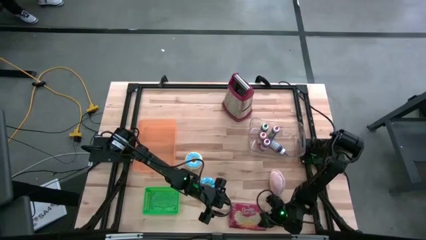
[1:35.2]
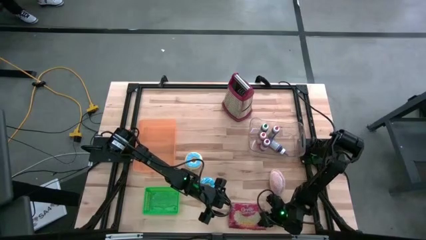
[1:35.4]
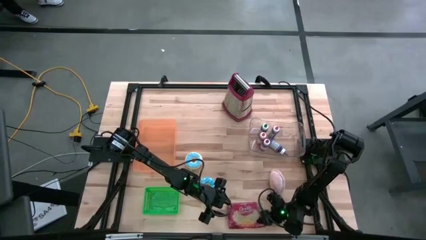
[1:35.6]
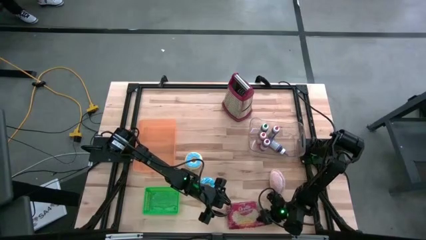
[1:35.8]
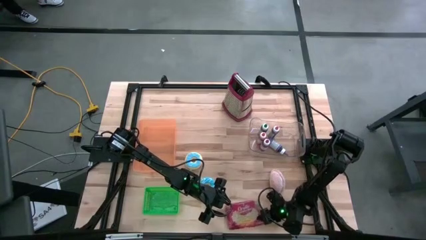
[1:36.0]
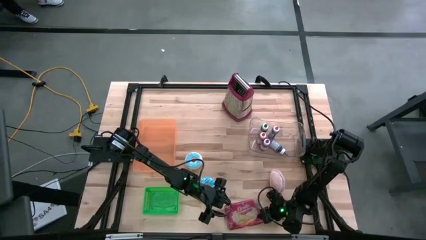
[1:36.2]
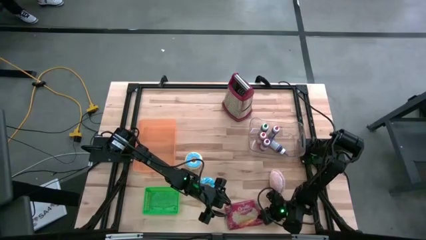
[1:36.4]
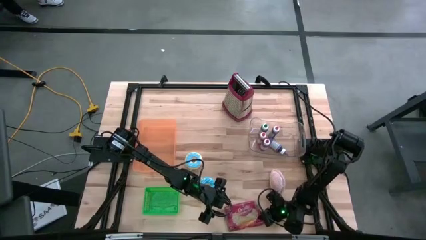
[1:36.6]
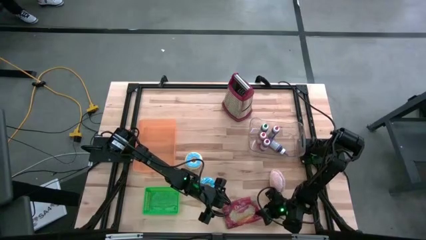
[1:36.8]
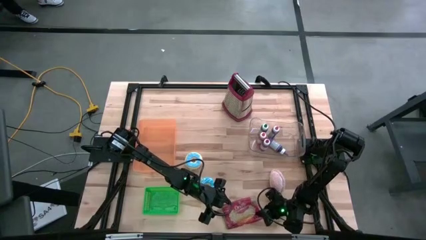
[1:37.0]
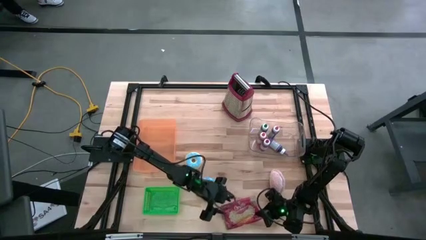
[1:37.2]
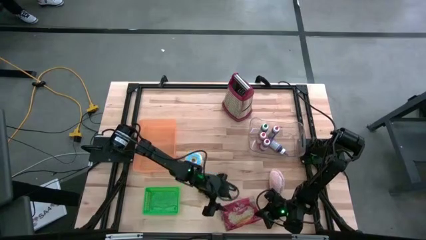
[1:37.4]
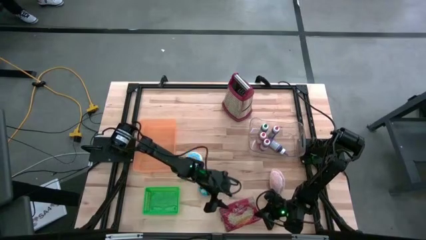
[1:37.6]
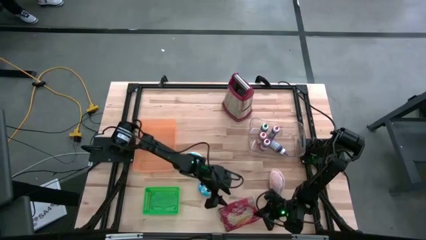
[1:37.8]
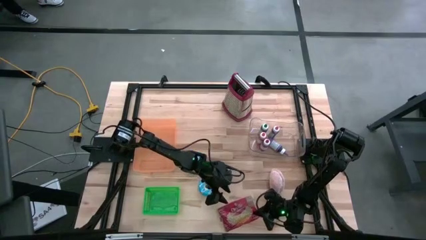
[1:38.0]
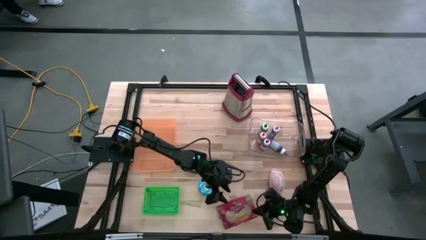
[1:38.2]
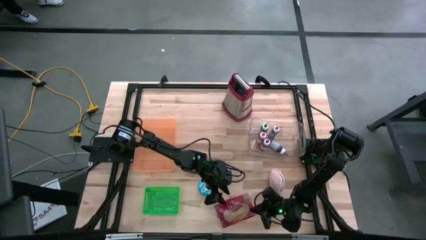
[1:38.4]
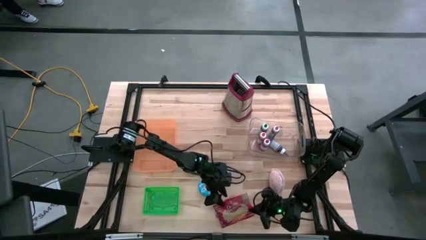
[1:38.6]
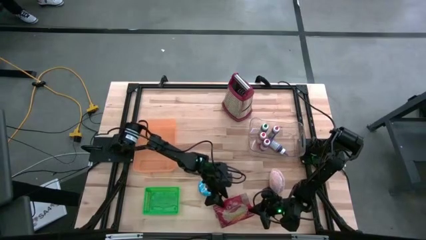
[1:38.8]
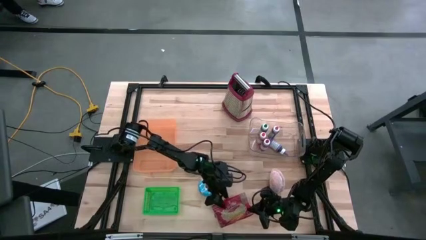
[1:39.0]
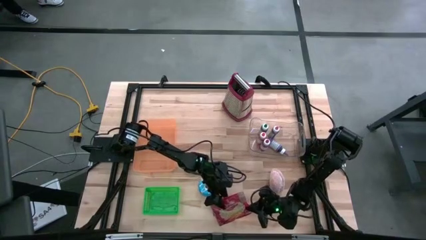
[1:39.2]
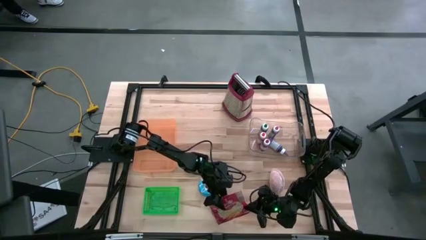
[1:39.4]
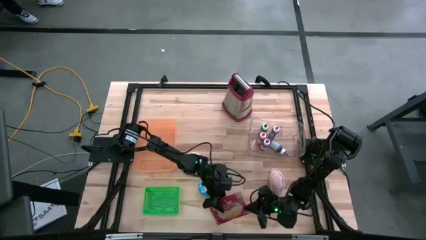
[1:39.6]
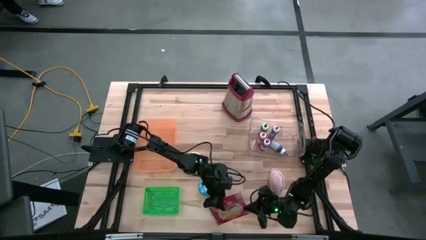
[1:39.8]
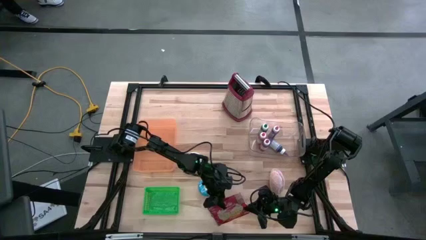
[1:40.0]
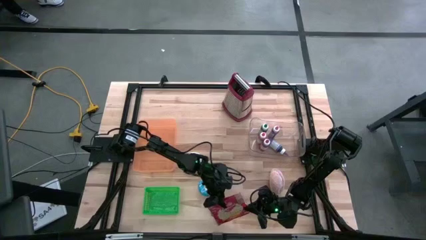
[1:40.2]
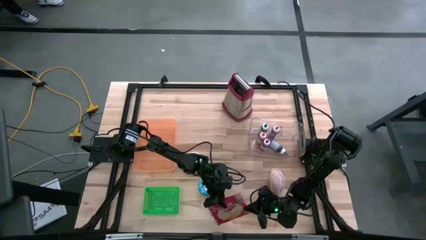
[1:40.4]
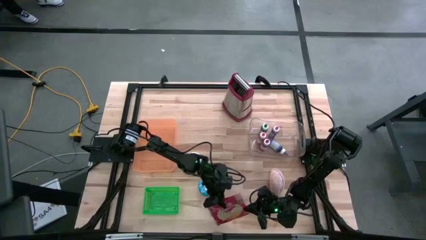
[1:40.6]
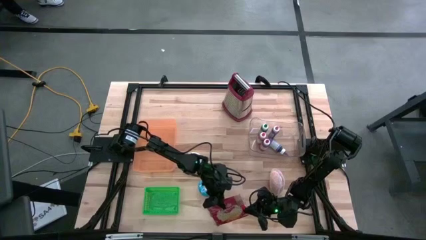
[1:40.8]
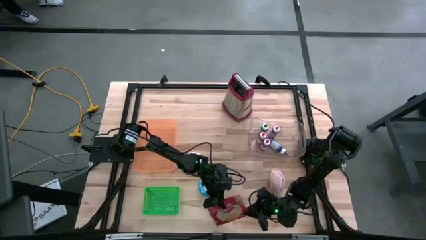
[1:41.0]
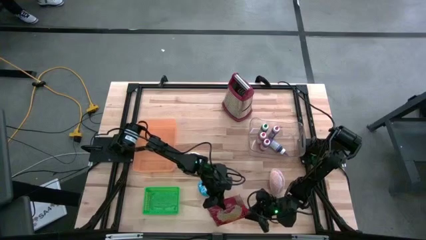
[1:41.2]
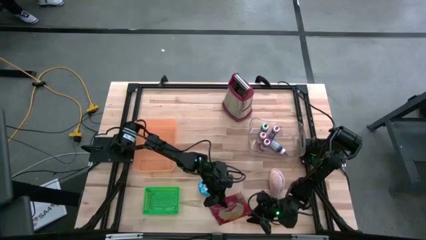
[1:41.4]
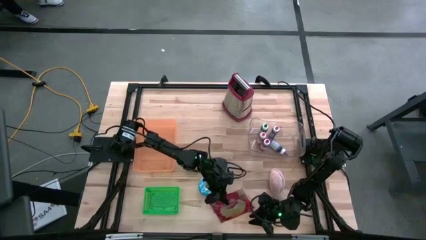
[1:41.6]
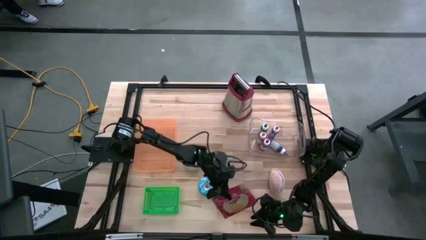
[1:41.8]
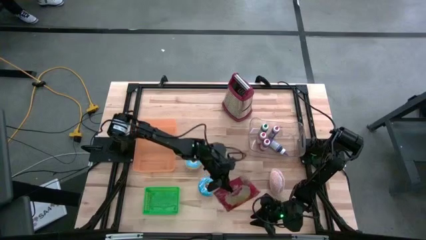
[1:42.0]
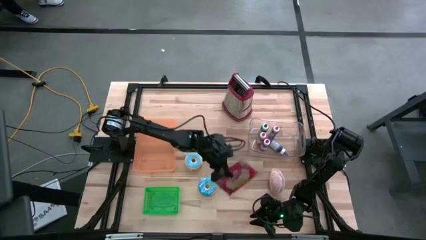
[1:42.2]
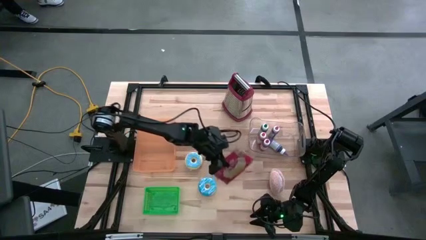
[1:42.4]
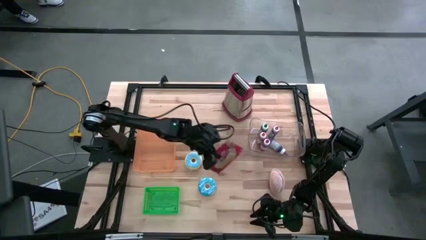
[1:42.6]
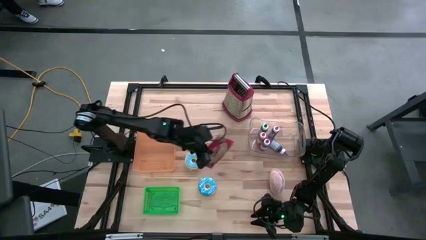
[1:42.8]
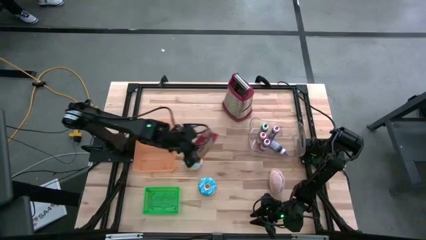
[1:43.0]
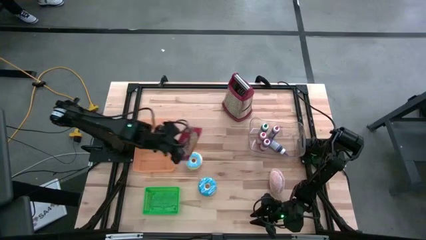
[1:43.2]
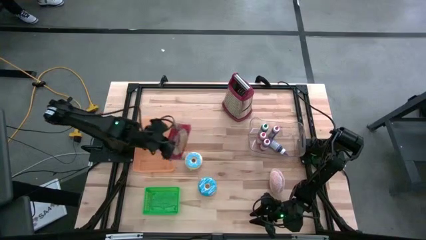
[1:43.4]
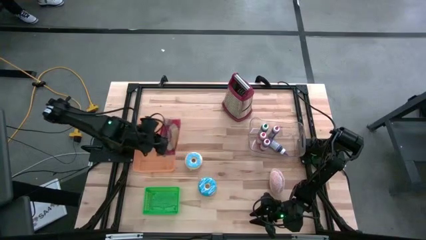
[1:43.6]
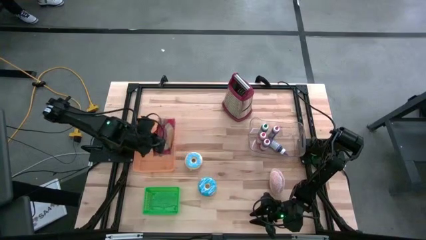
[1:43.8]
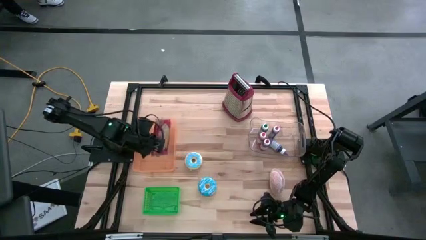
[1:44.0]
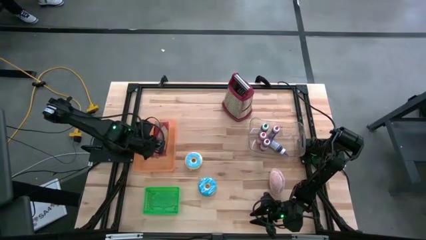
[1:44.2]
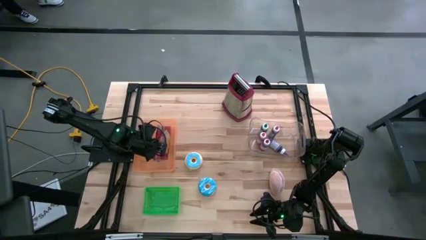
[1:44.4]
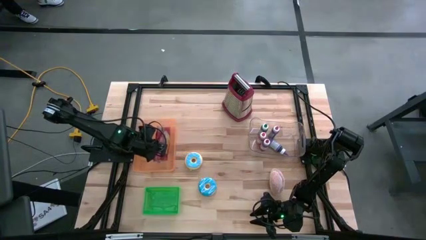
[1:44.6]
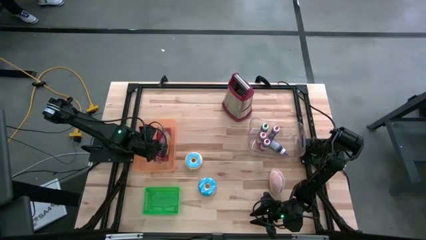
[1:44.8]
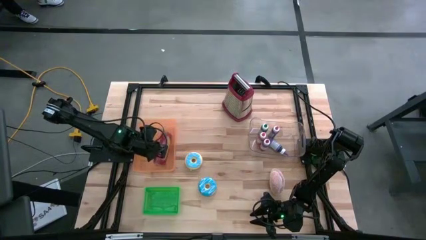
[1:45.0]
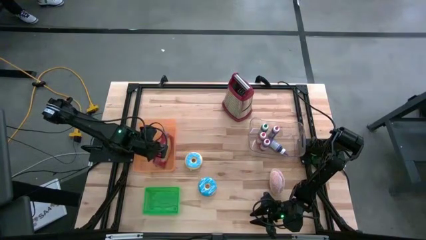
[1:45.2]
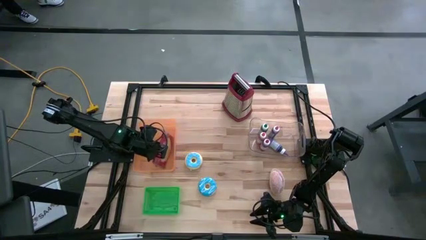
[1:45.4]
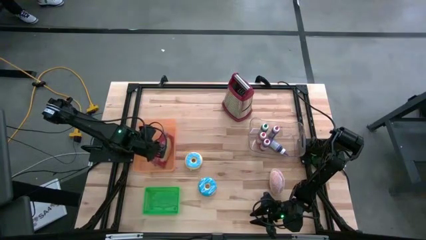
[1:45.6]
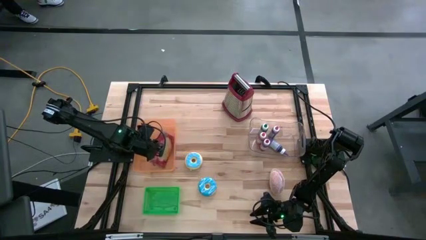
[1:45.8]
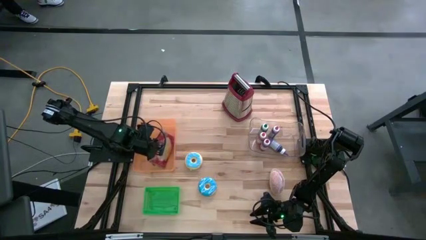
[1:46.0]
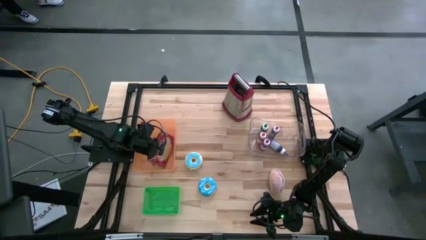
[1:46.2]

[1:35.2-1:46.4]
Put the popcorn bag into the orange bin
